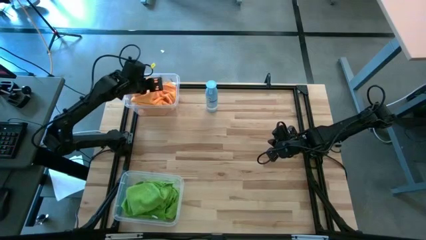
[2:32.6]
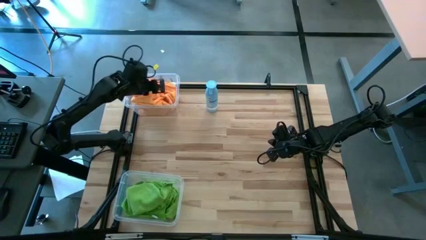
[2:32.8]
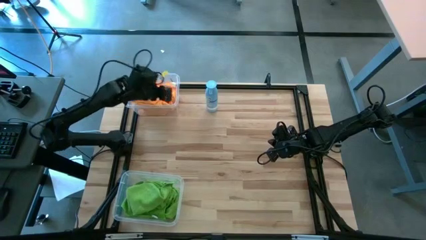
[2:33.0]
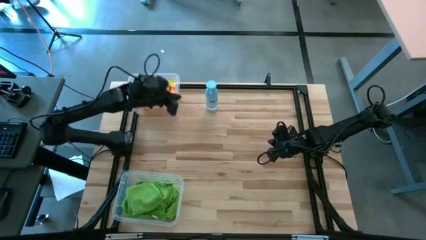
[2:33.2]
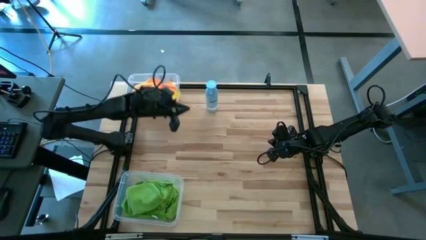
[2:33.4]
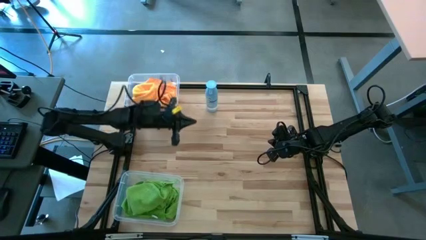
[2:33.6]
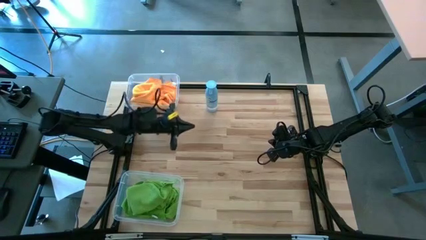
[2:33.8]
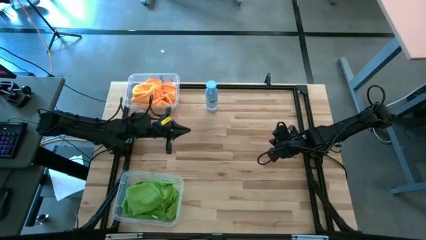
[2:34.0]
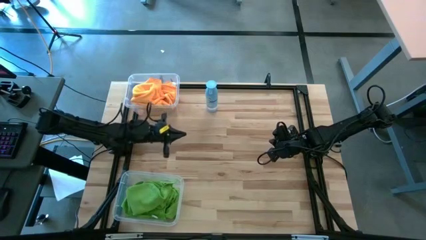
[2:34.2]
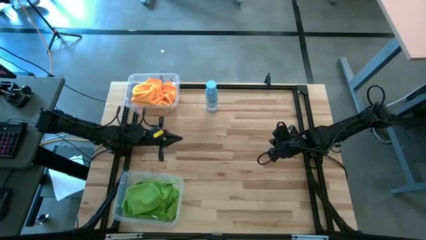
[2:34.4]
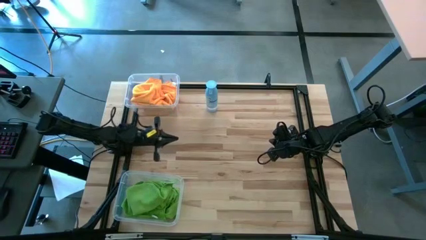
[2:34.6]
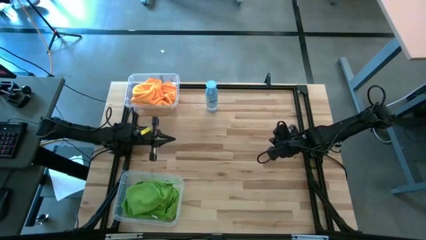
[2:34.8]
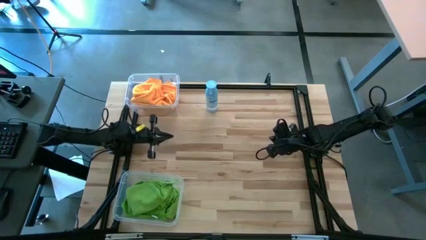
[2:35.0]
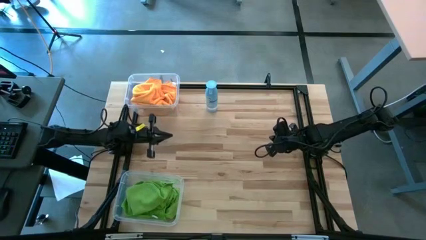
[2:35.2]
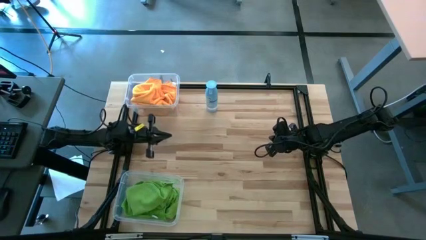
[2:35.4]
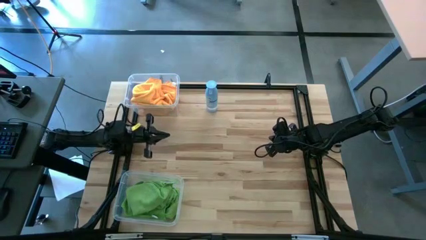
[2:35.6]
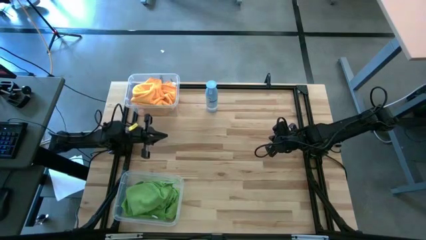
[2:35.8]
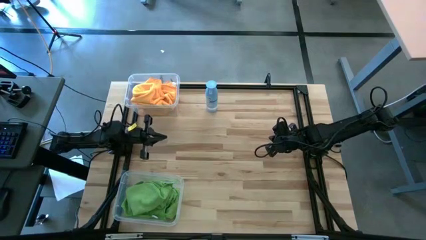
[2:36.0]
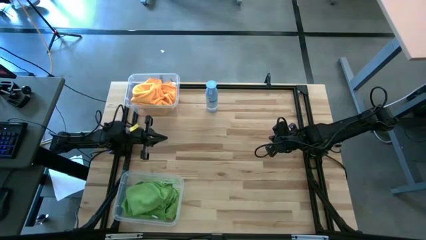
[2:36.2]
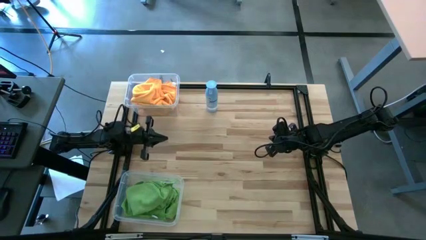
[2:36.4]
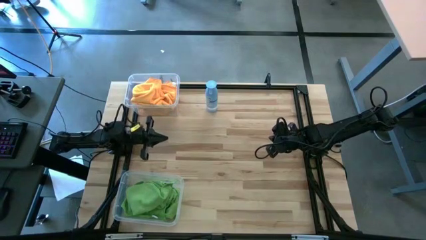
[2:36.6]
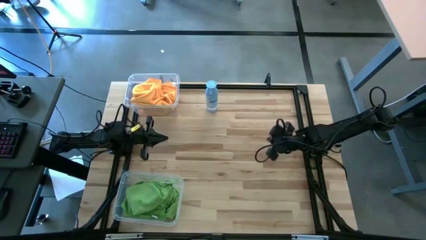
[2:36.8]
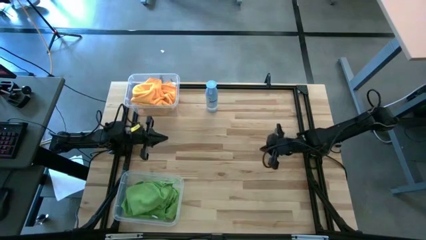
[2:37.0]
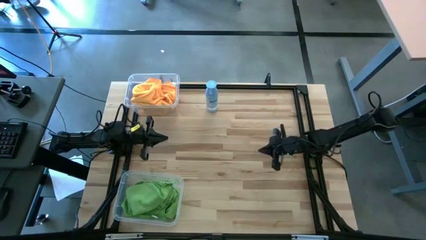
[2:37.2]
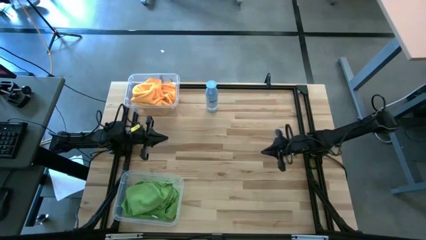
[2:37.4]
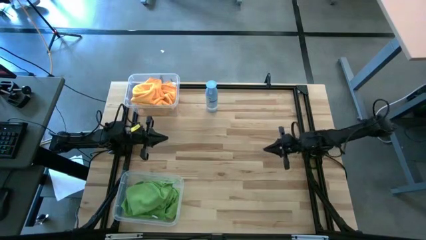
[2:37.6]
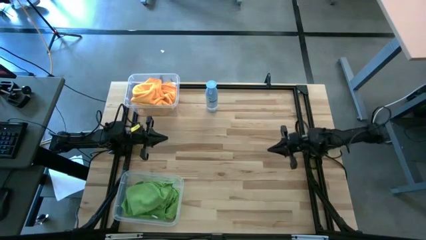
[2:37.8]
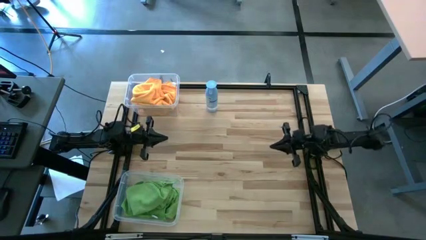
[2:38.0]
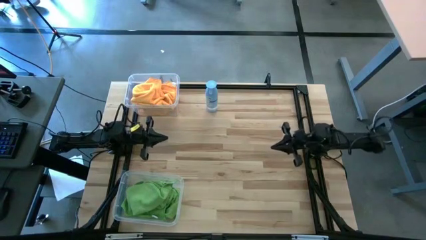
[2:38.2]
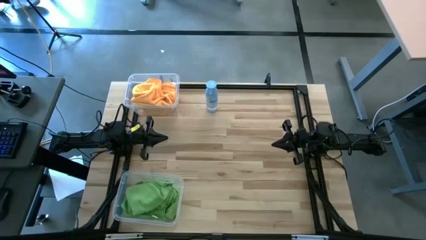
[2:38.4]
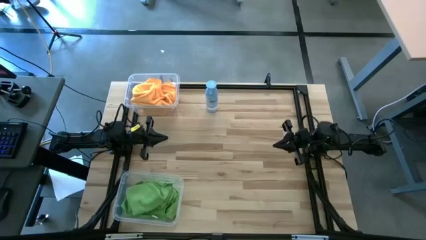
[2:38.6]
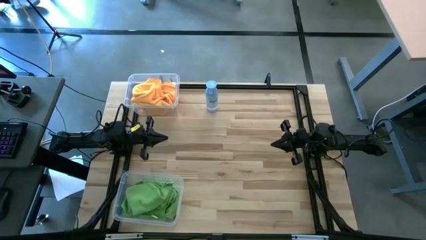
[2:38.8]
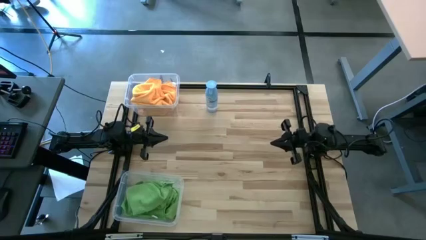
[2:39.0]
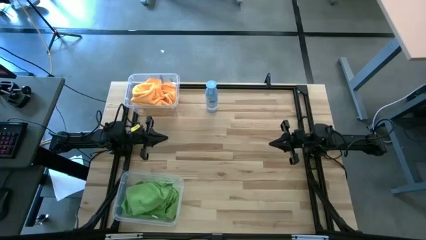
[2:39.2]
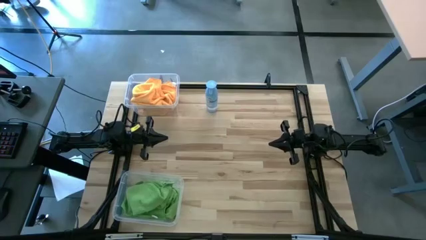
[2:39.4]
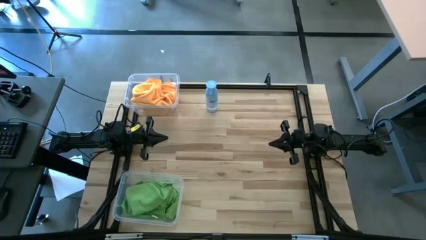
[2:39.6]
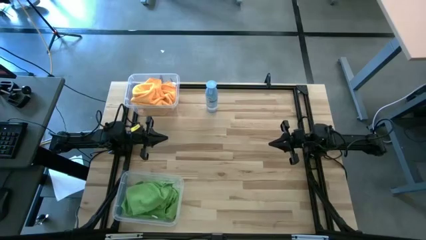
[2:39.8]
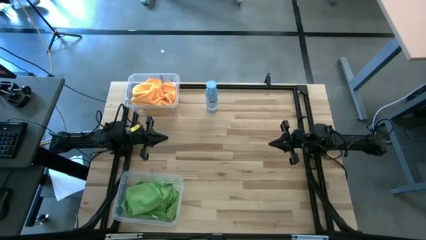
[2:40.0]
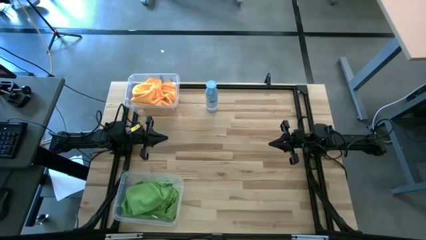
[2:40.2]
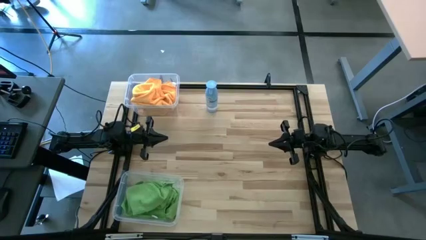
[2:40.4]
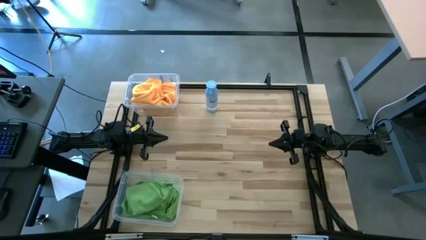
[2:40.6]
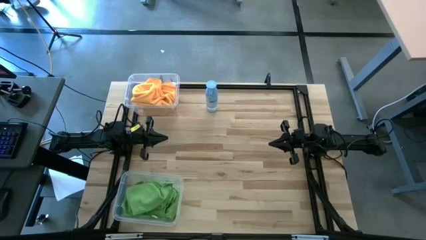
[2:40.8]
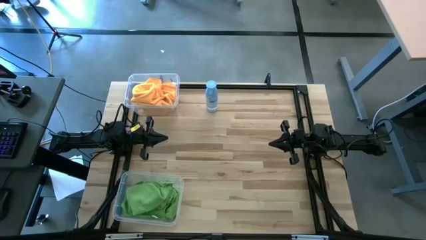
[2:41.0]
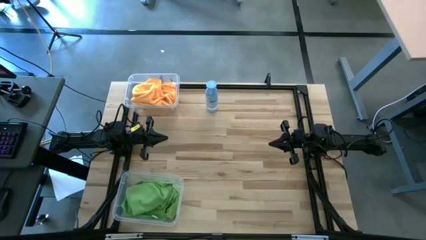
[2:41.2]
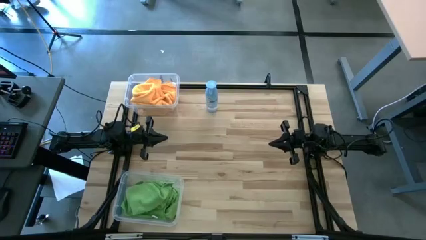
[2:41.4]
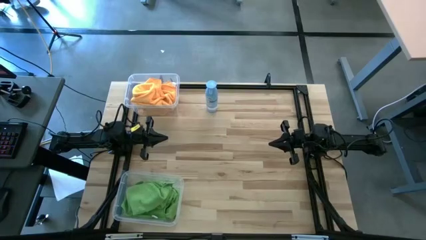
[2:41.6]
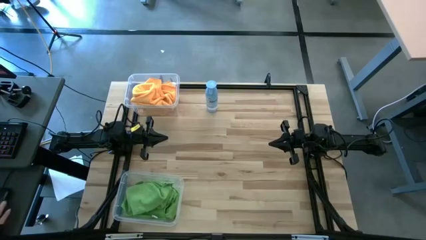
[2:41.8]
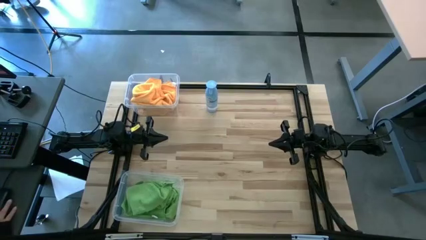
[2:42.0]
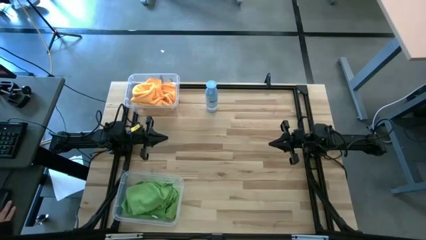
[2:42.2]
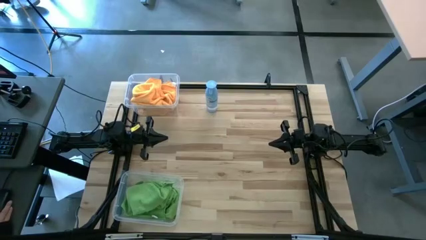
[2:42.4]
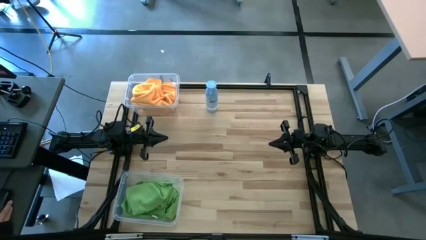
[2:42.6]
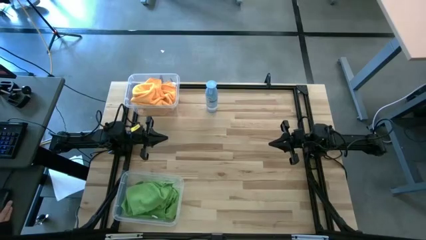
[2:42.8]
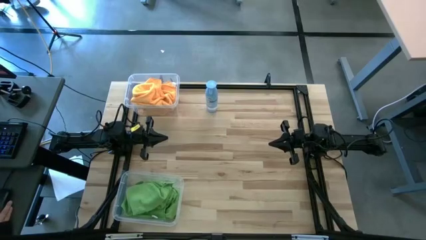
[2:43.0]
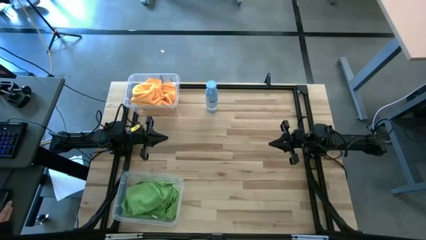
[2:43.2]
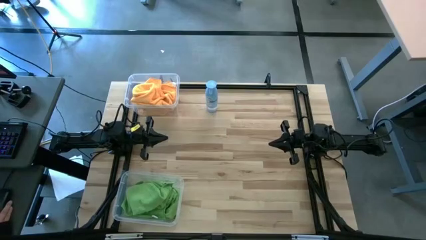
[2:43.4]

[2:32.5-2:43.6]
Task: Sort microfiber towel by color & place in baskets
Return to Home Position

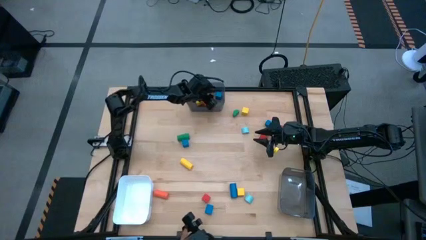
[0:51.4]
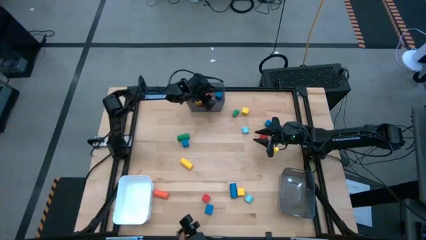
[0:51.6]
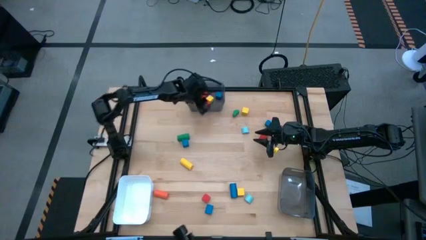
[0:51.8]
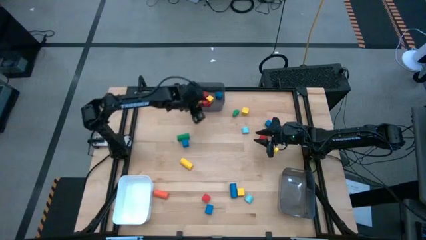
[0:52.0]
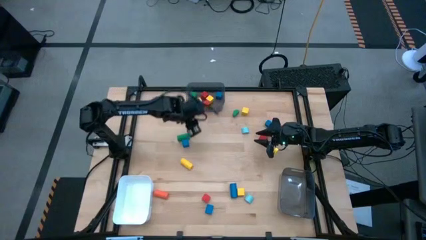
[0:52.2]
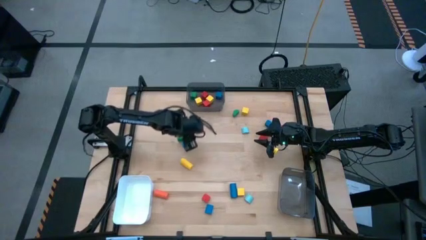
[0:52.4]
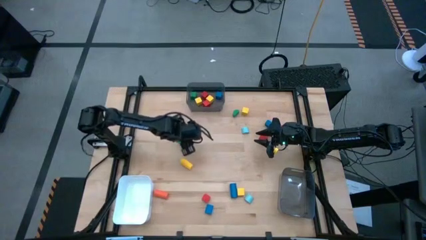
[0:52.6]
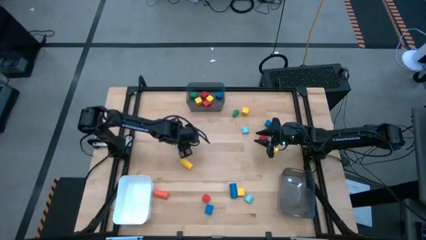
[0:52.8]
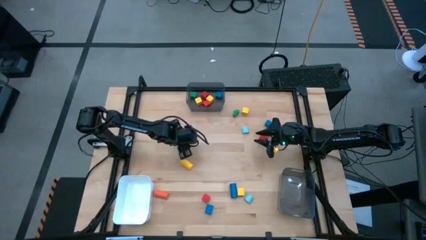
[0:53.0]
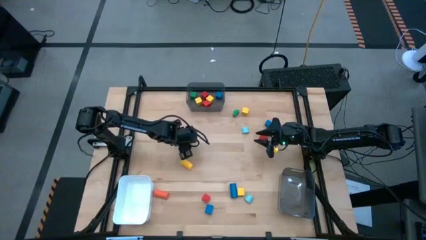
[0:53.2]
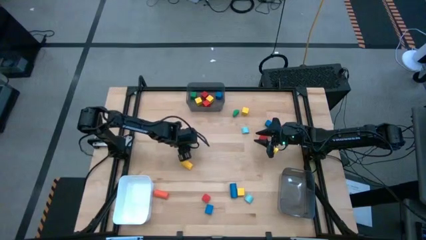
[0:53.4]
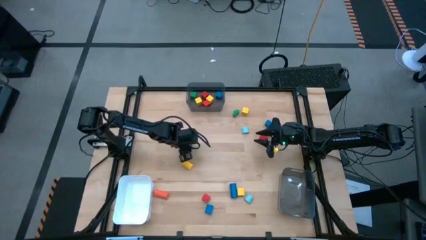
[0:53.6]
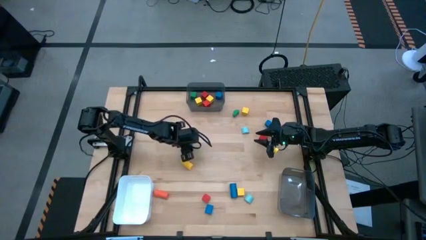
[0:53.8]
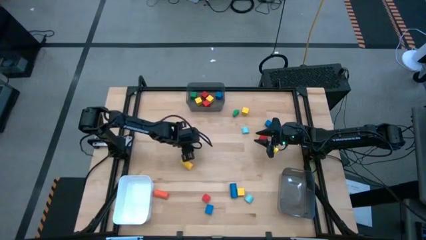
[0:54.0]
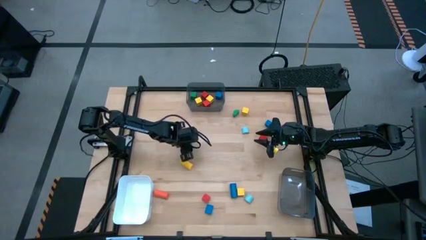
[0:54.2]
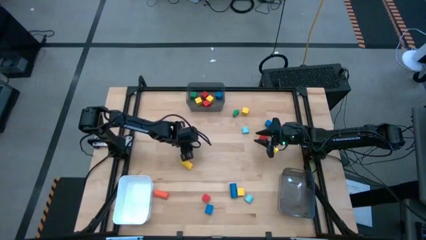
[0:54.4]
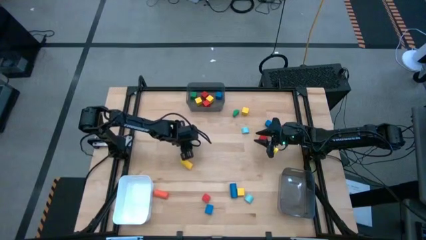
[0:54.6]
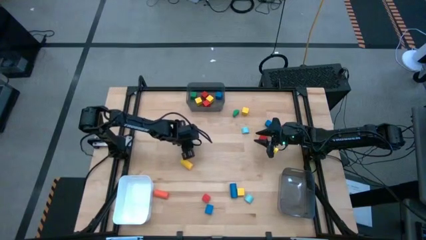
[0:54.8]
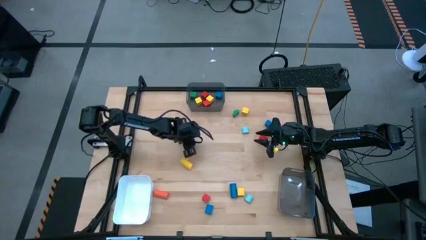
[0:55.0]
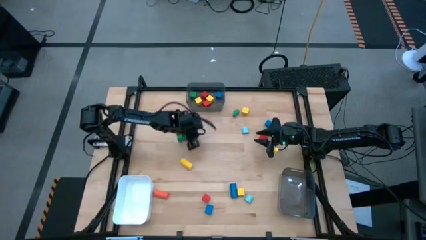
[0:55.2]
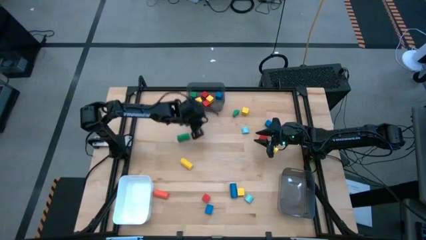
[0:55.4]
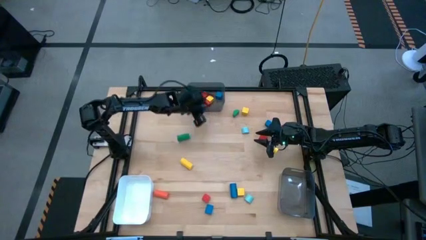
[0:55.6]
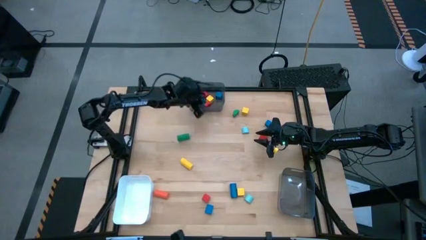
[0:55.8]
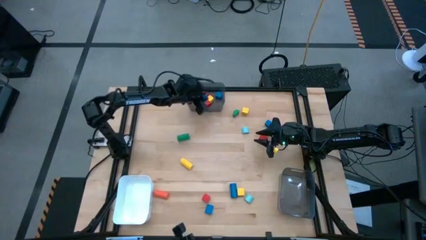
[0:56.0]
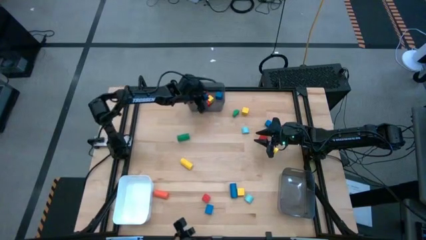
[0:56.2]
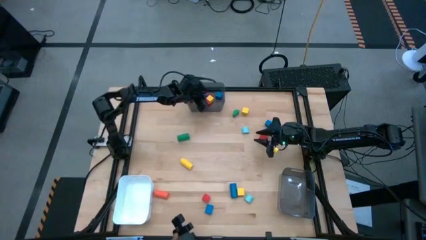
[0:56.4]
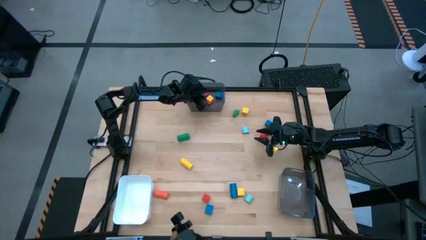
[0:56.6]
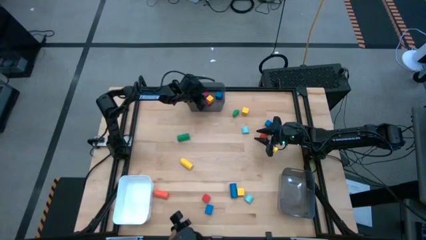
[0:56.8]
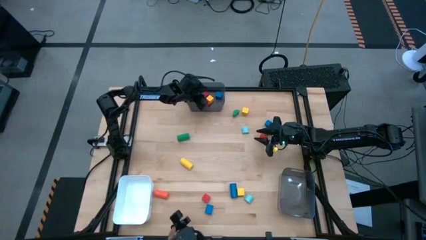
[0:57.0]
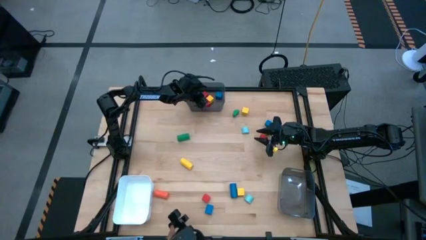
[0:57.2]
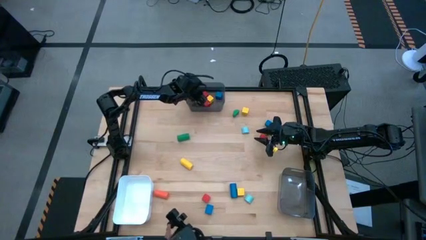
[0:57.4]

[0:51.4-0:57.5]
Task: Sort blocks by size
Put the blue square block into the top black bin
